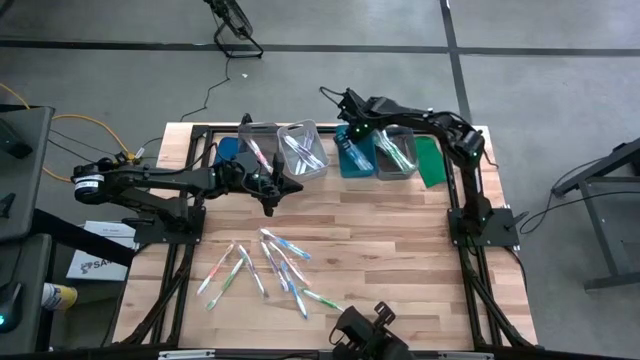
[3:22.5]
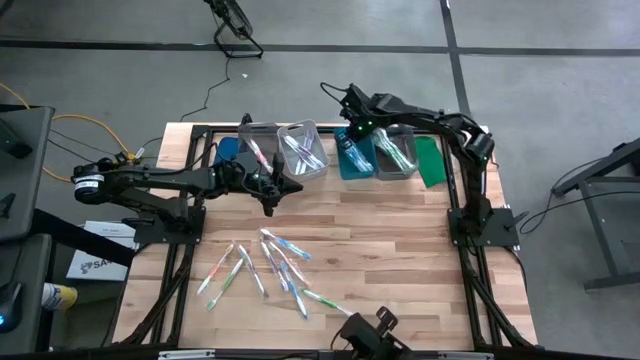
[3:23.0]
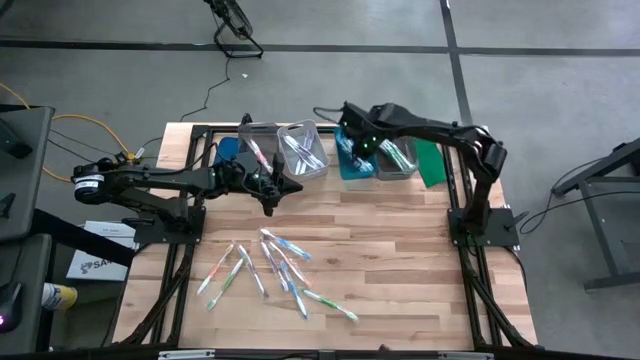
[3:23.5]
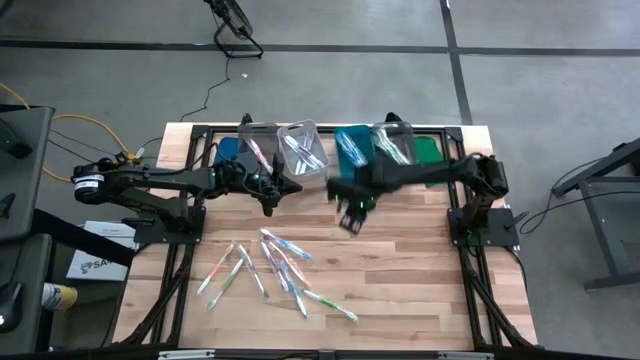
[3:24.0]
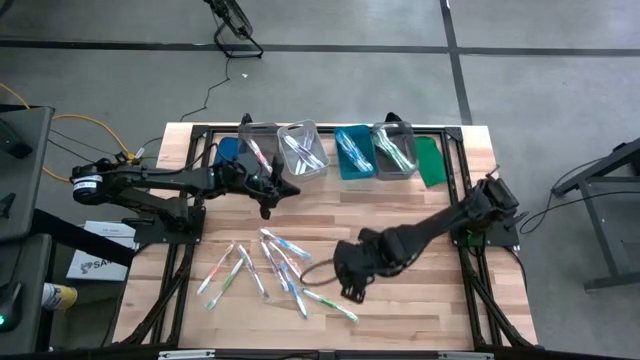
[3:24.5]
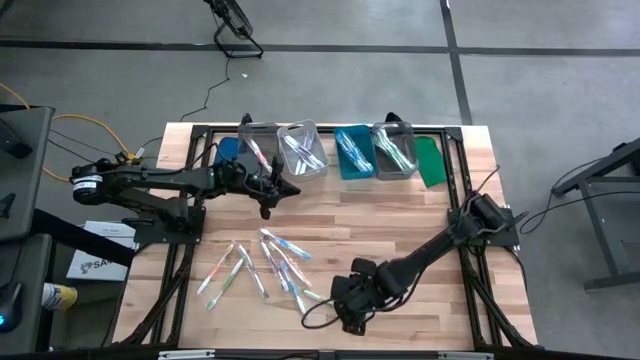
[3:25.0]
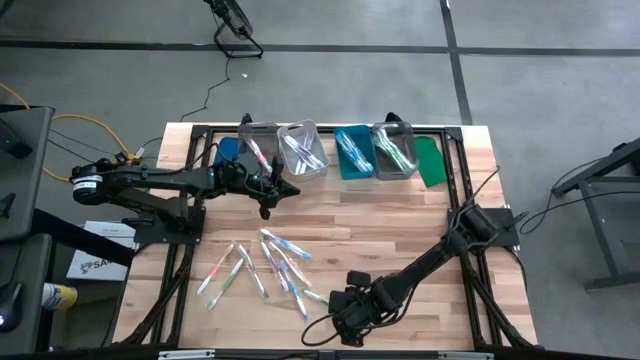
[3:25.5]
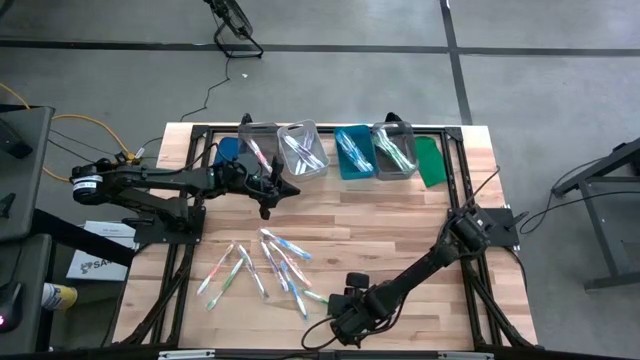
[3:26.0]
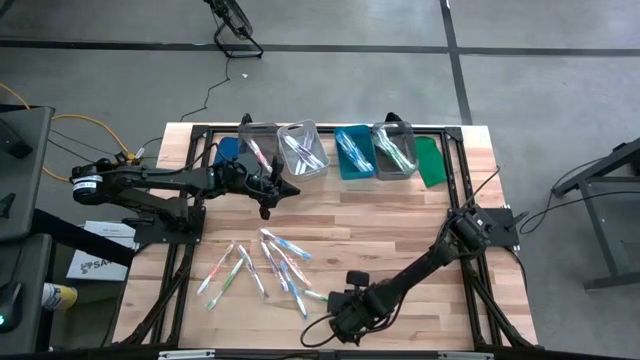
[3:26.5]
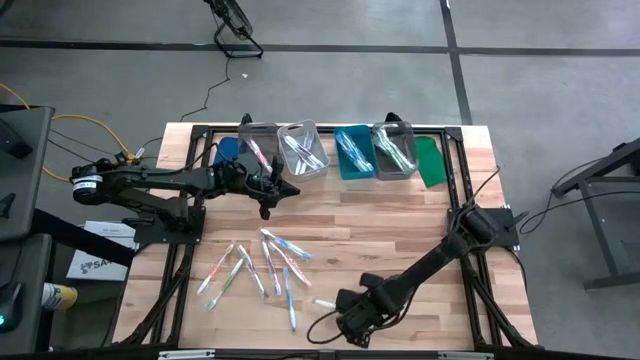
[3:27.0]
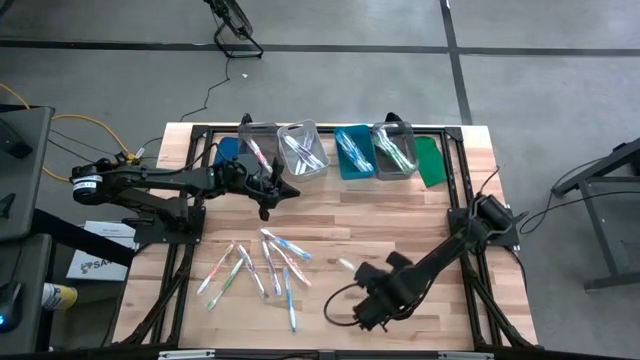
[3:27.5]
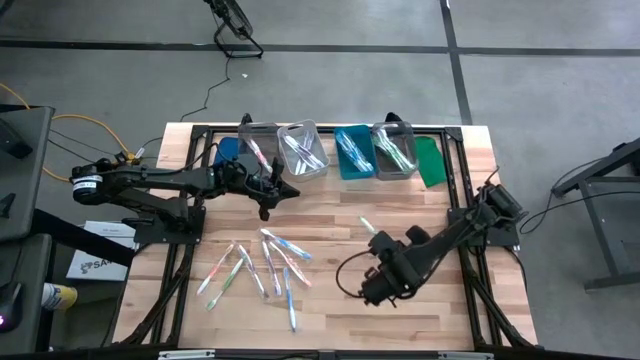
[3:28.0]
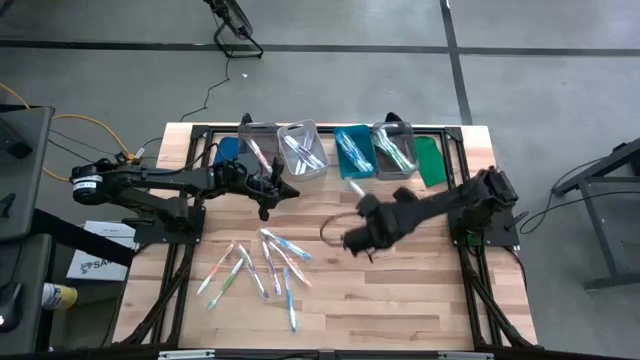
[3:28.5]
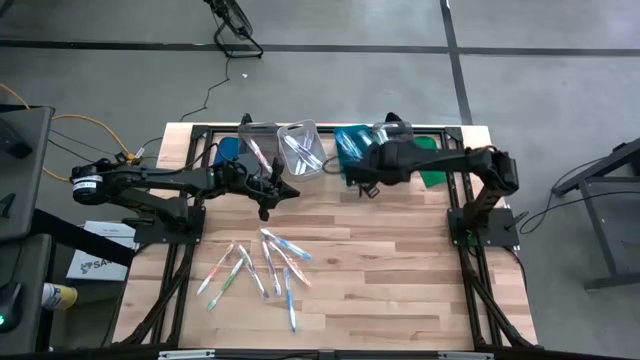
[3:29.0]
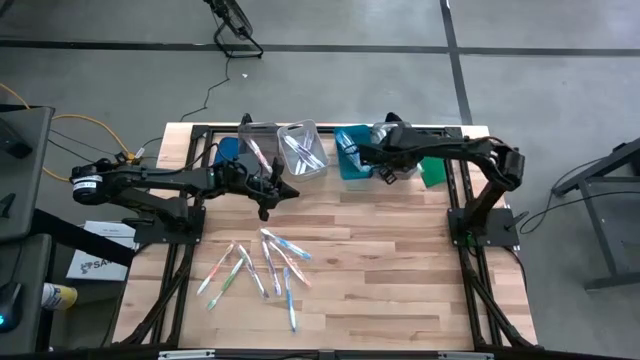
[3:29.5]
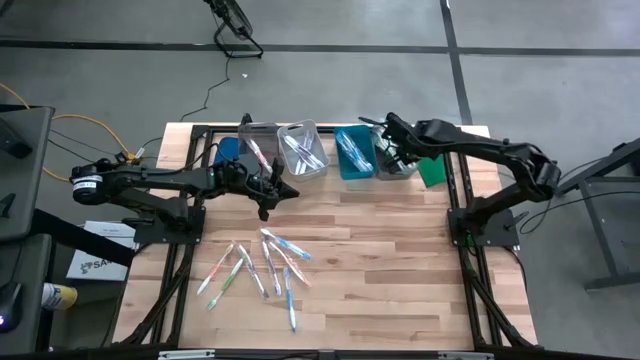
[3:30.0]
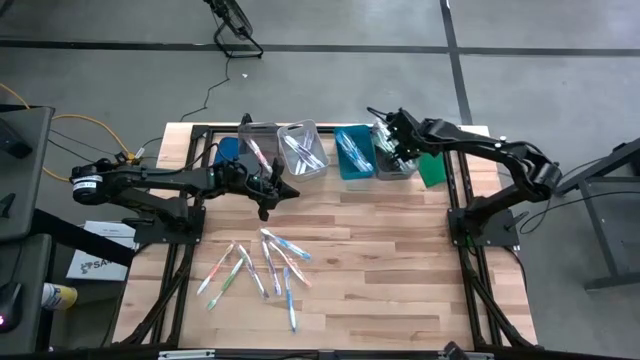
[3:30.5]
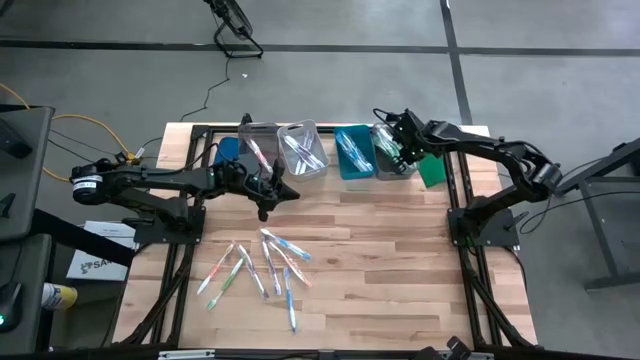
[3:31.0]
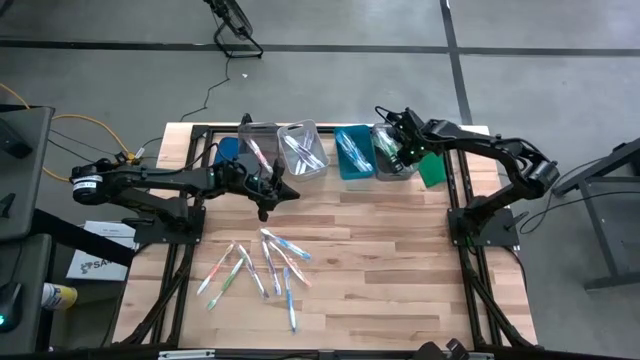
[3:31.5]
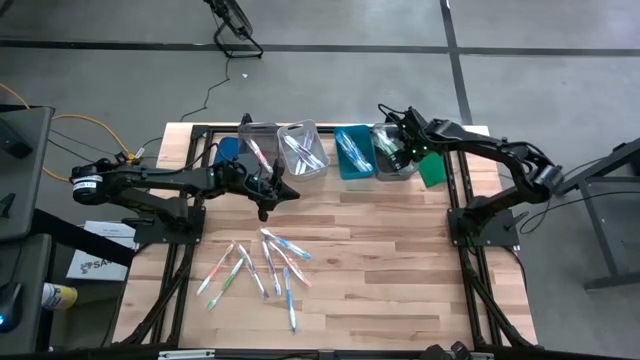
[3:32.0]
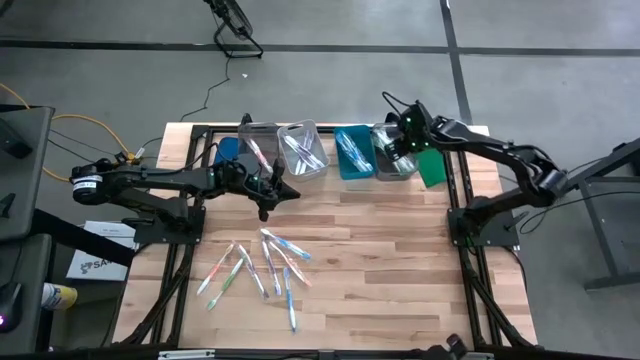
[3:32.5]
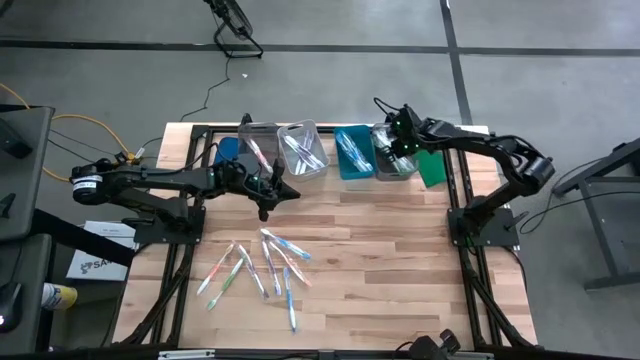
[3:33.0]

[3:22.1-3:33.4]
Task: Pick & Place Toothbrushes
Put the green toothbrush into the right black bin

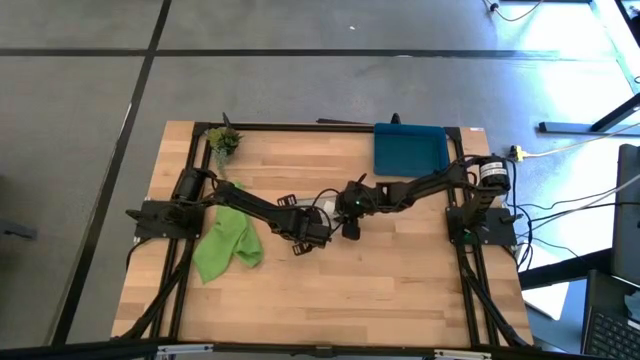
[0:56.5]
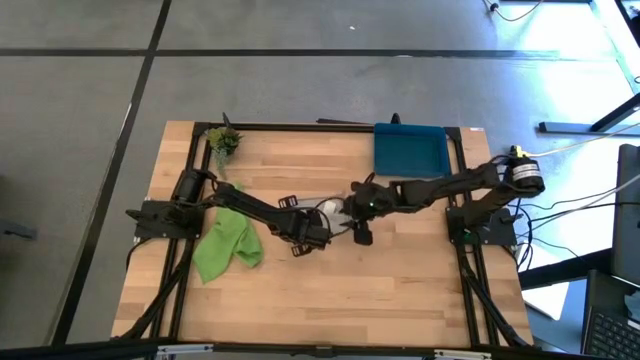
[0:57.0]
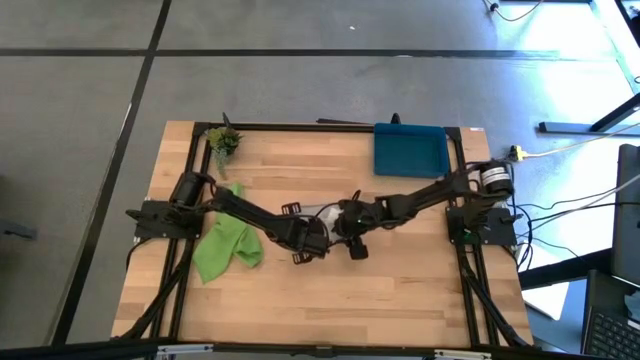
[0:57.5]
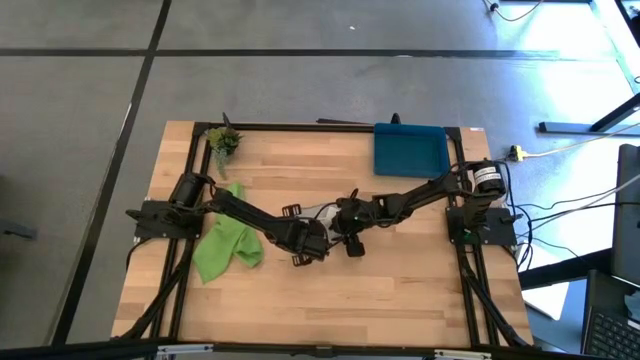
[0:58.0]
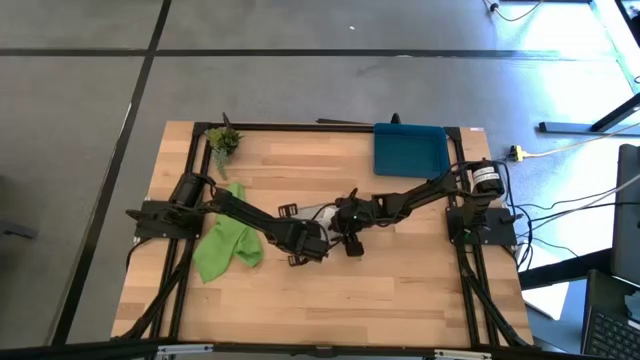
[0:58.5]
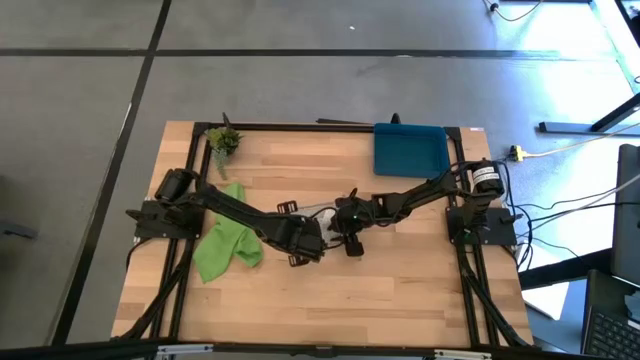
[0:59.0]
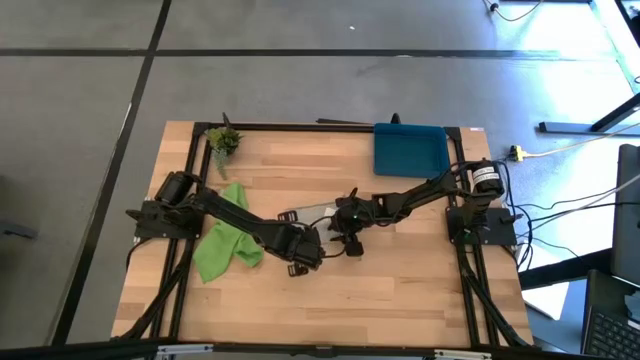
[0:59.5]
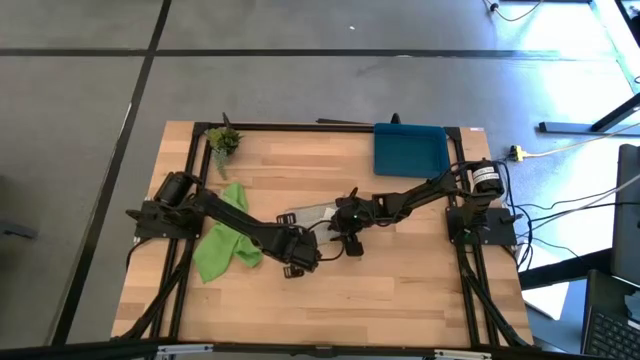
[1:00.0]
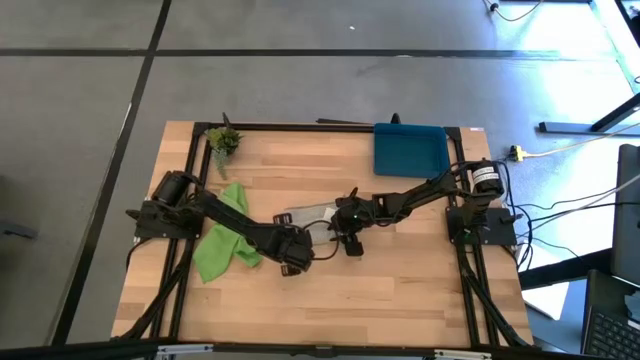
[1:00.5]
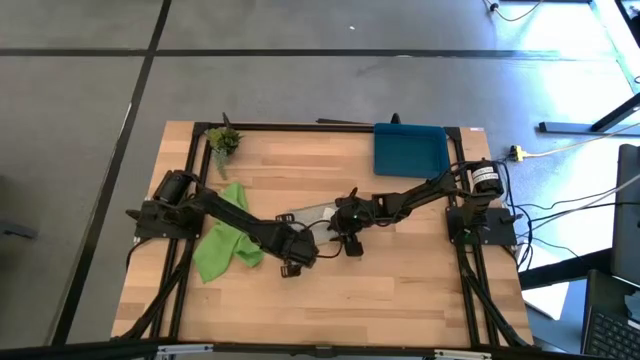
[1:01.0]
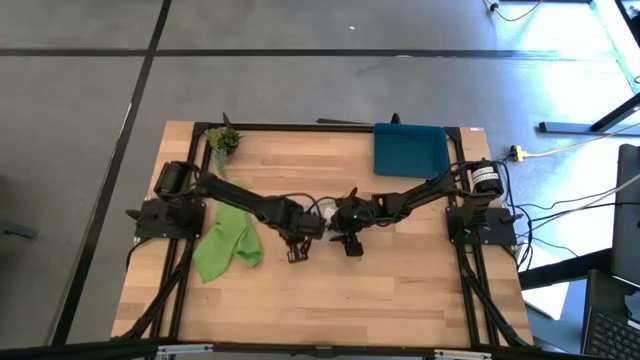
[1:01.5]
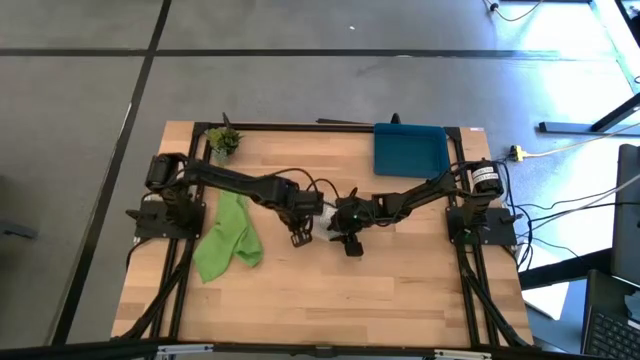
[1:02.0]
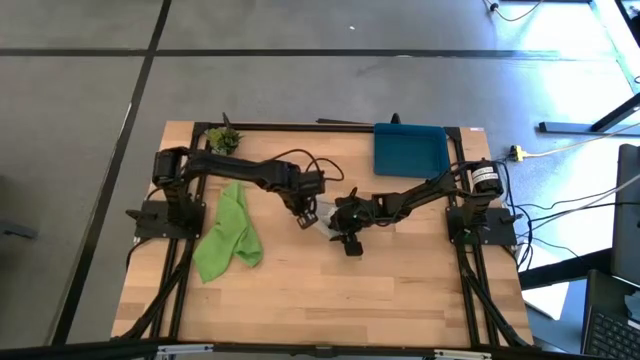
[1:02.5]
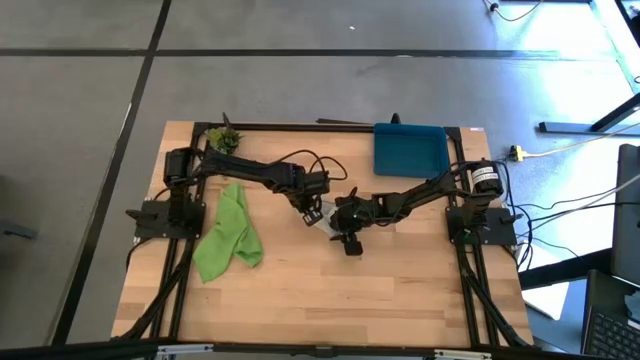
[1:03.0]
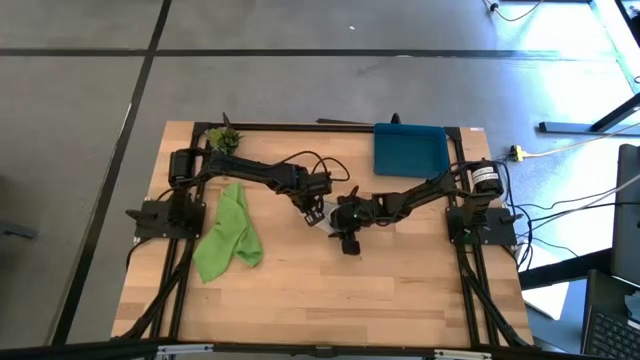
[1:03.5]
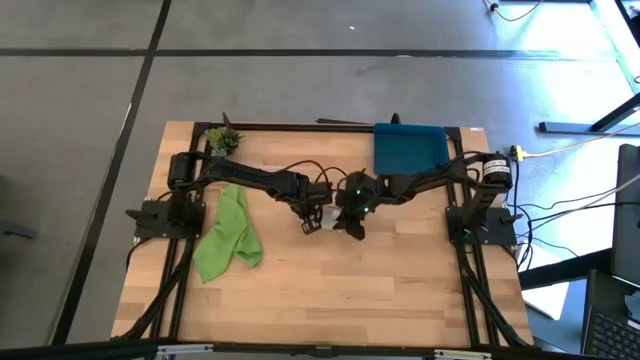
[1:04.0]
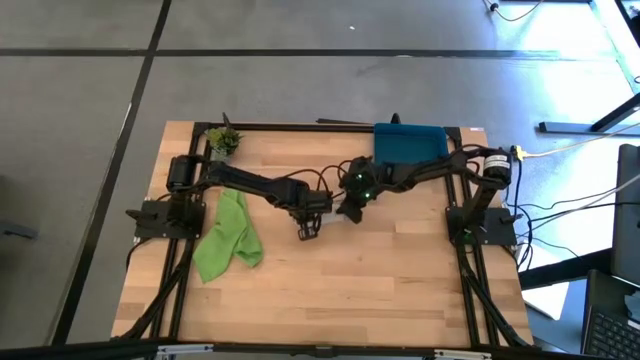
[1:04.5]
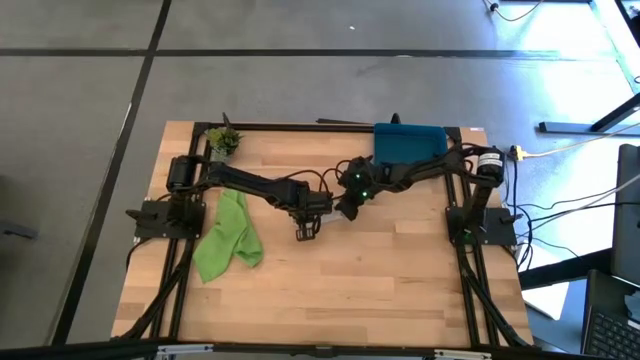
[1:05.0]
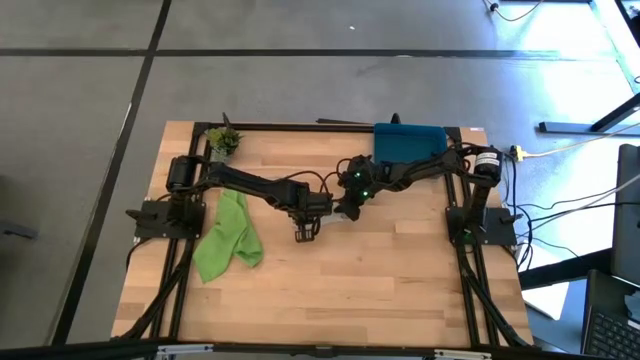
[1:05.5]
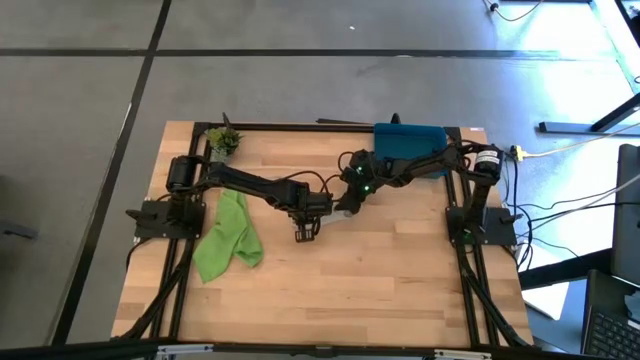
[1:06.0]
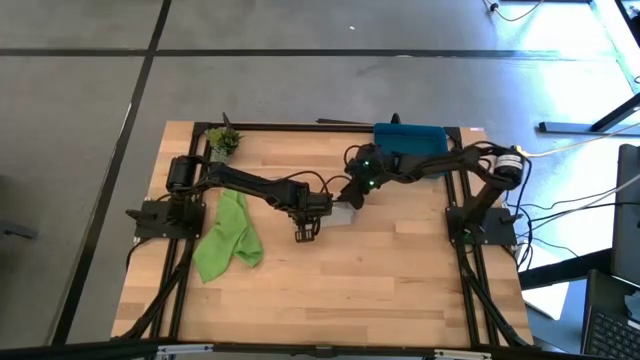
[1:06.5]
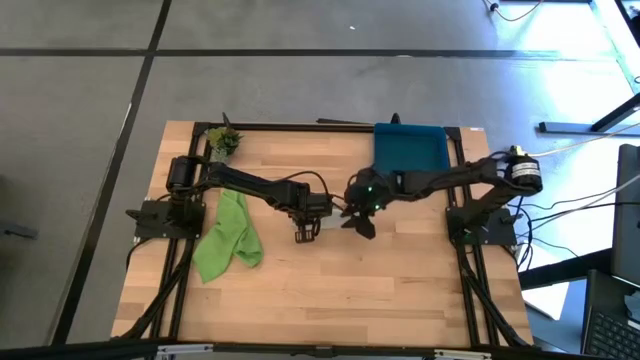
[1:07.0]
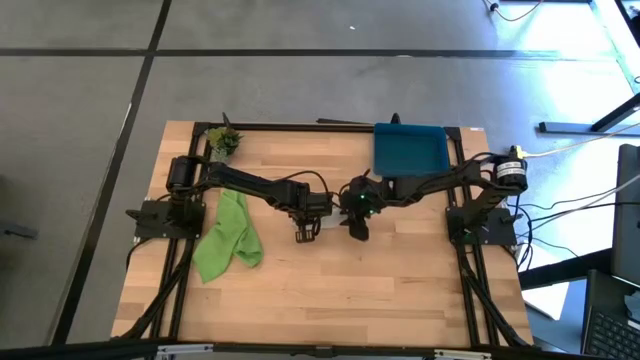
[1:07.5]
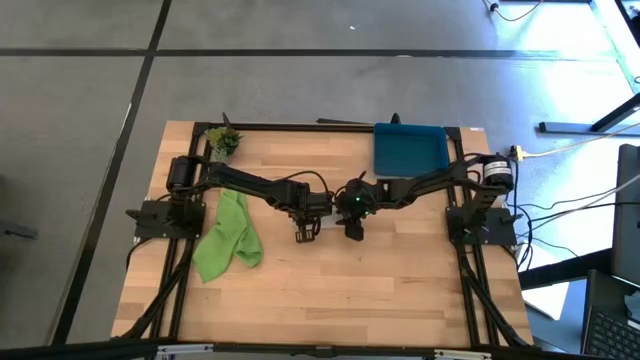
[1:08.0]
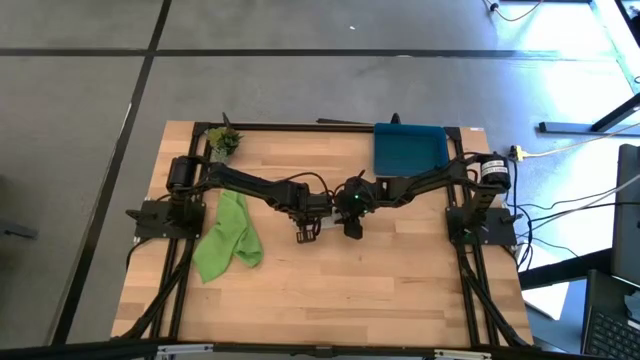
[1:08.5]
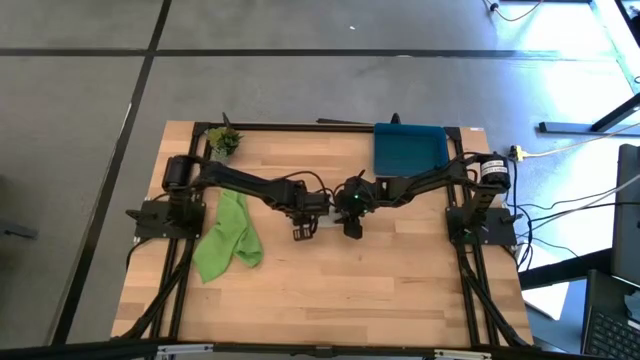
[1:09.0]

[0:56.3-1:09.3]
Task: Roll microfiber towels into tight, uniform cylinder then place into a basket
Roll the gray microfiber cloth
